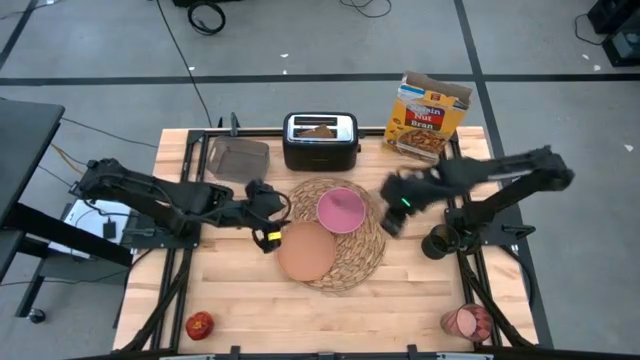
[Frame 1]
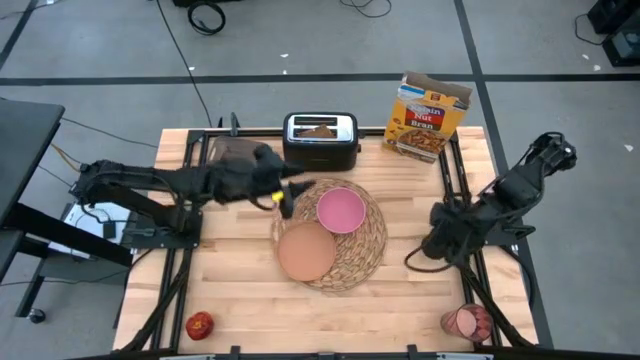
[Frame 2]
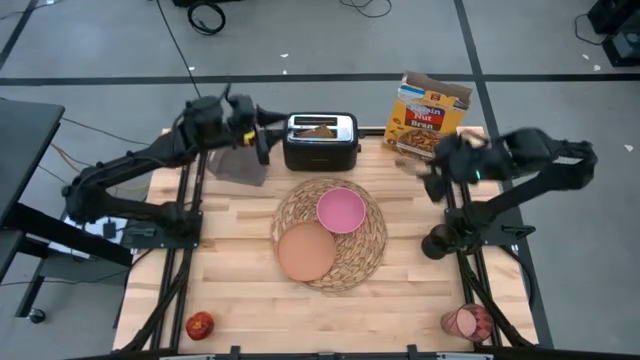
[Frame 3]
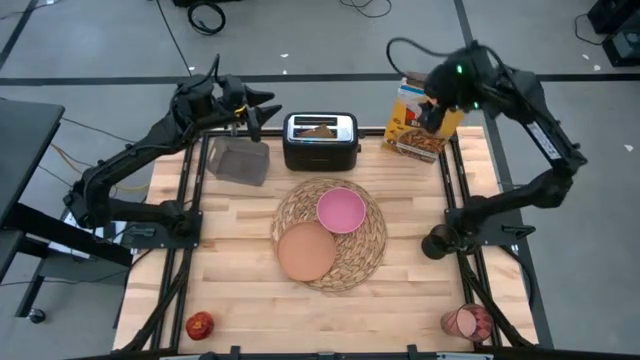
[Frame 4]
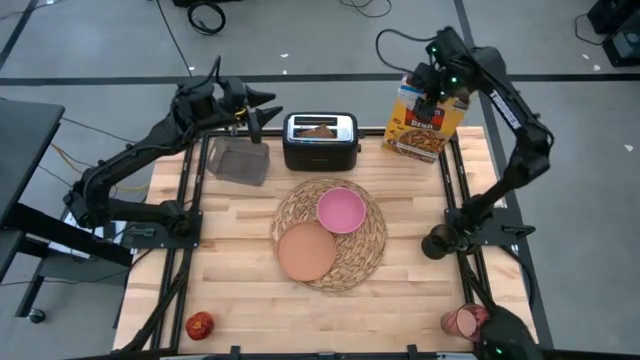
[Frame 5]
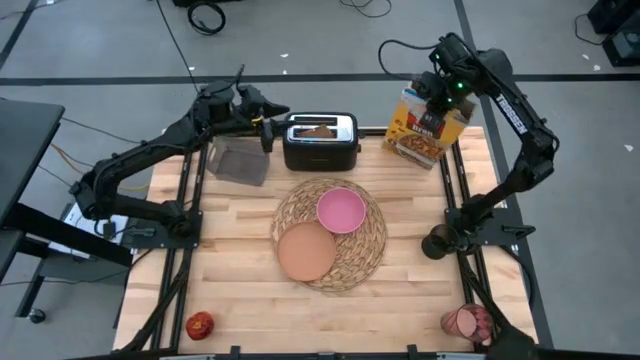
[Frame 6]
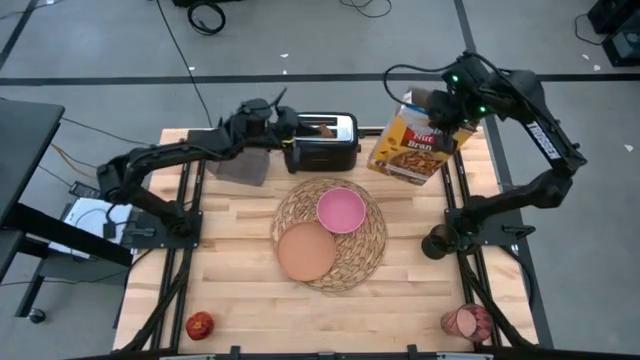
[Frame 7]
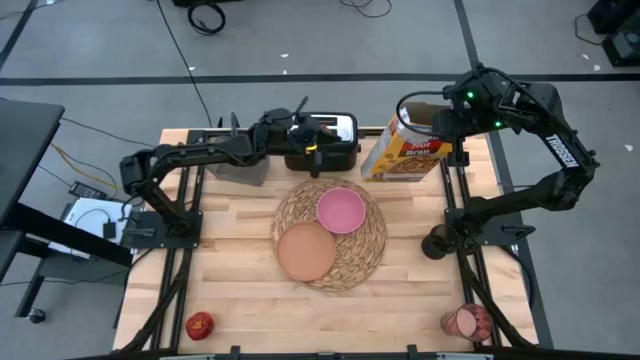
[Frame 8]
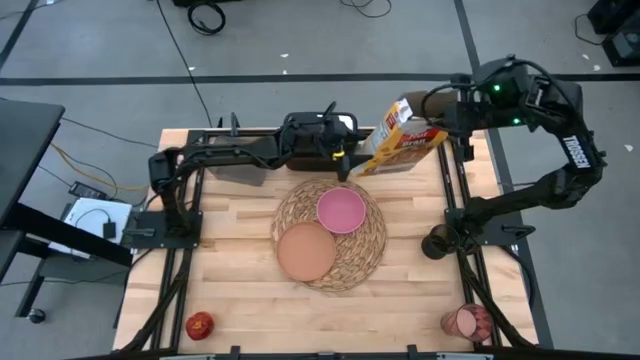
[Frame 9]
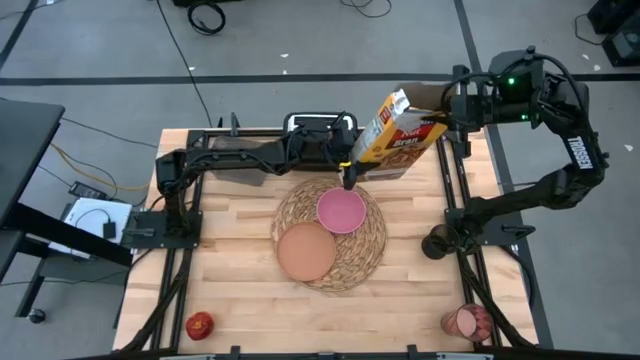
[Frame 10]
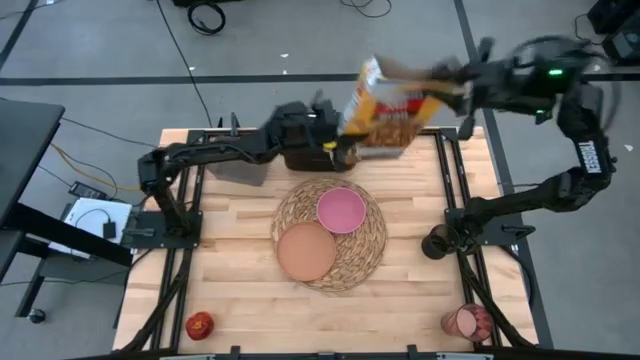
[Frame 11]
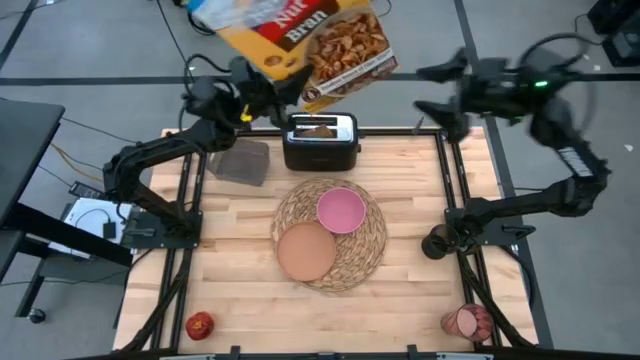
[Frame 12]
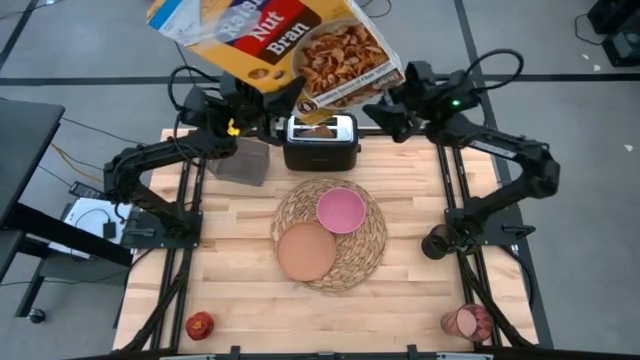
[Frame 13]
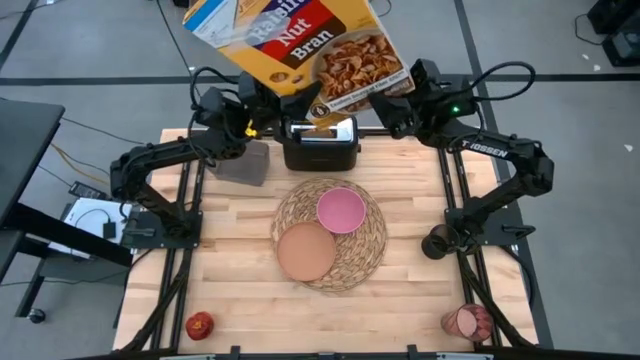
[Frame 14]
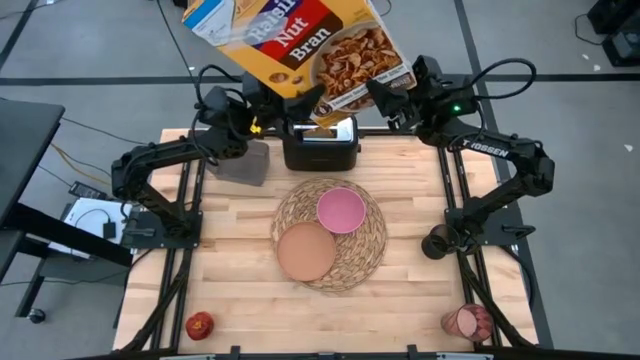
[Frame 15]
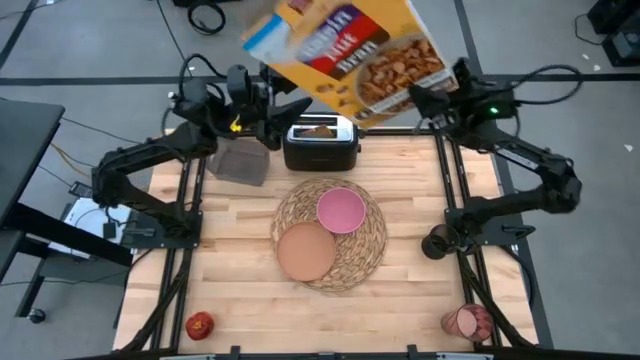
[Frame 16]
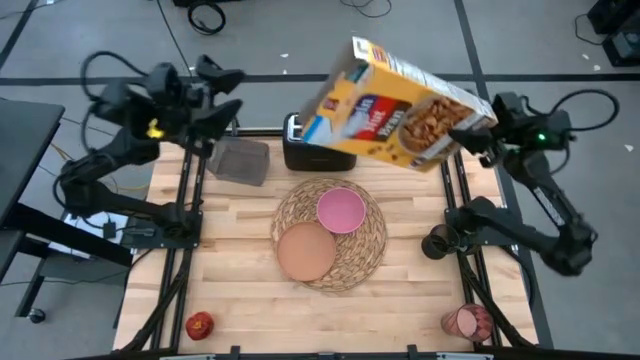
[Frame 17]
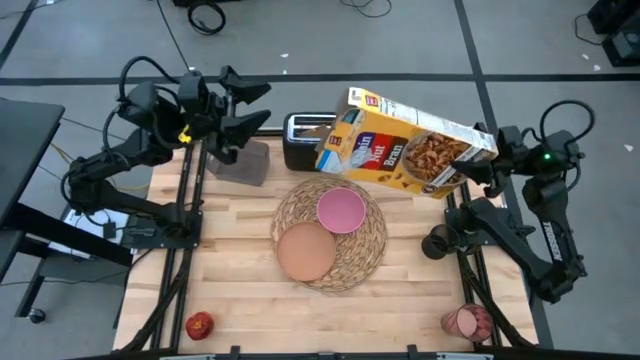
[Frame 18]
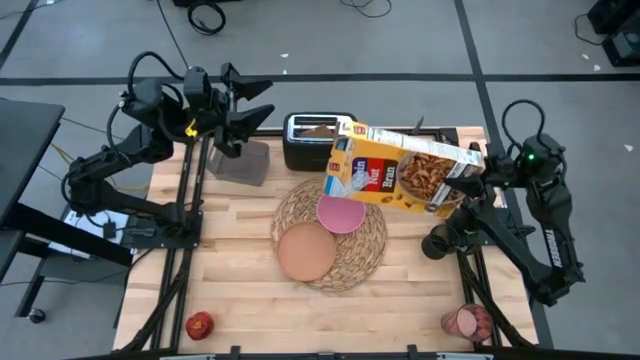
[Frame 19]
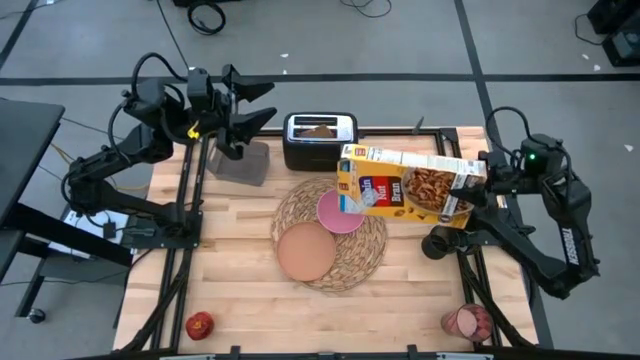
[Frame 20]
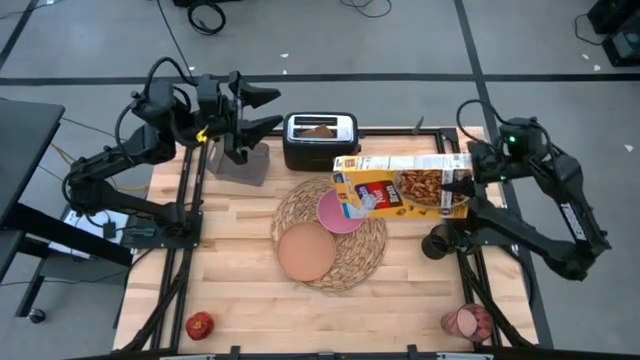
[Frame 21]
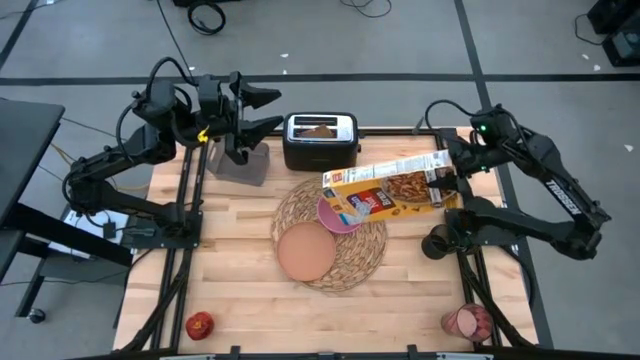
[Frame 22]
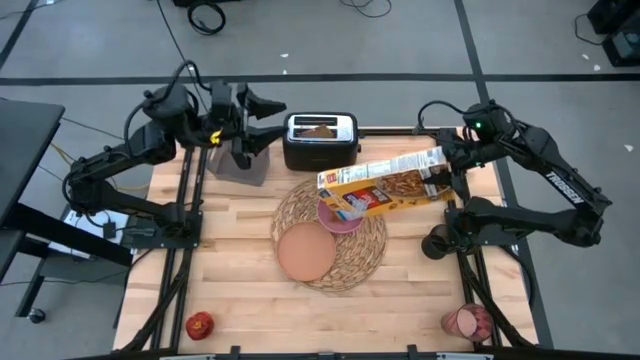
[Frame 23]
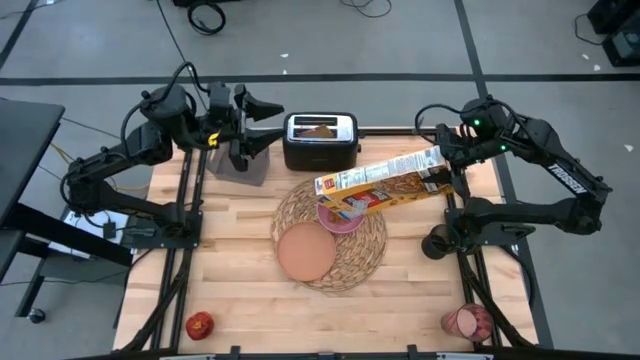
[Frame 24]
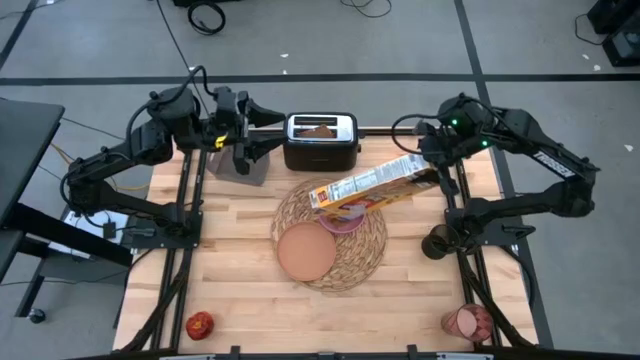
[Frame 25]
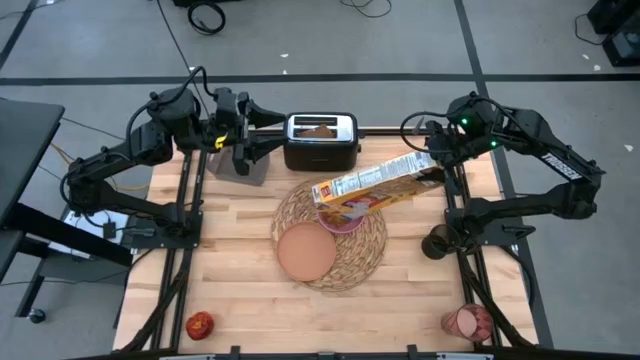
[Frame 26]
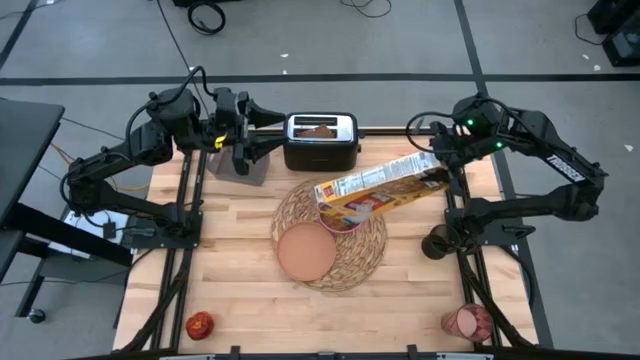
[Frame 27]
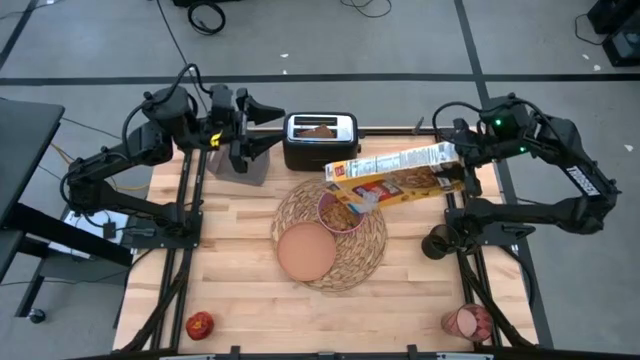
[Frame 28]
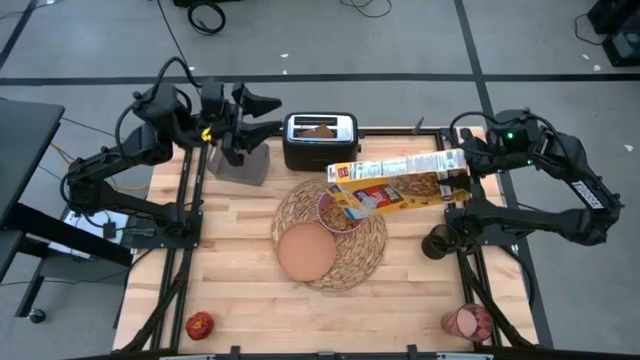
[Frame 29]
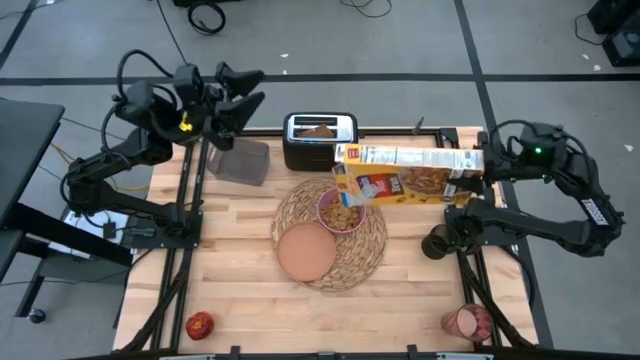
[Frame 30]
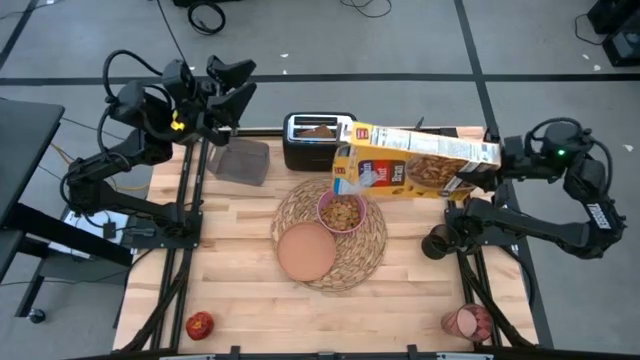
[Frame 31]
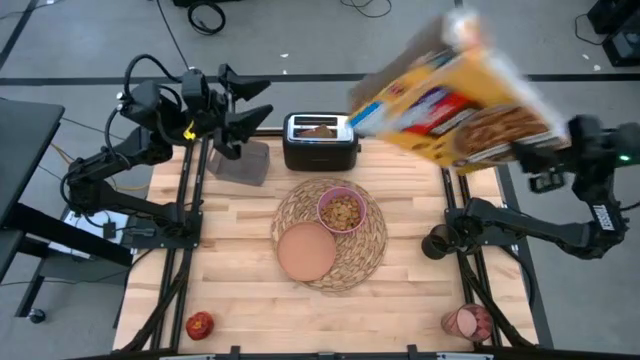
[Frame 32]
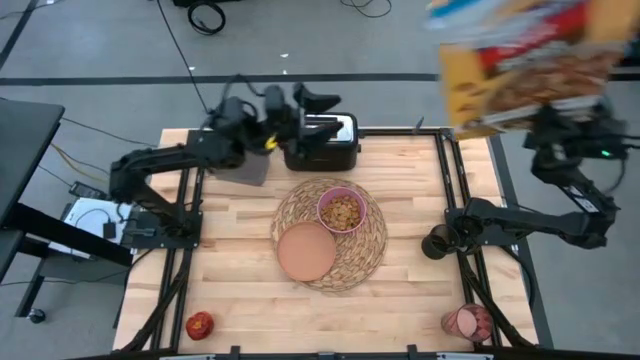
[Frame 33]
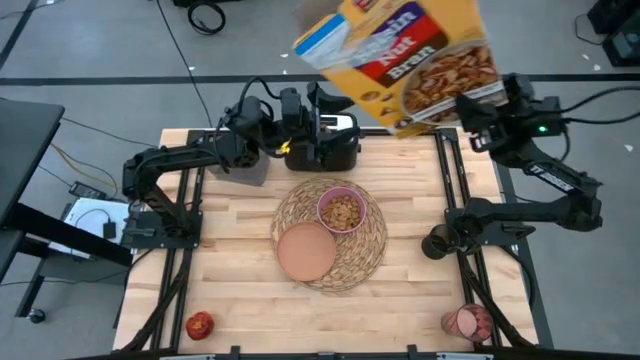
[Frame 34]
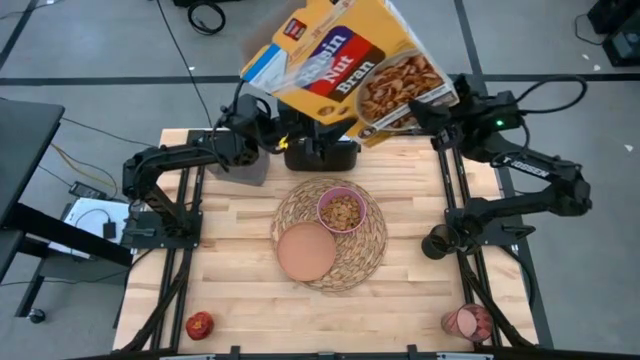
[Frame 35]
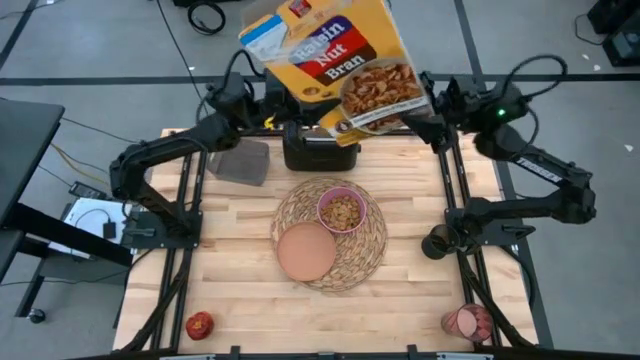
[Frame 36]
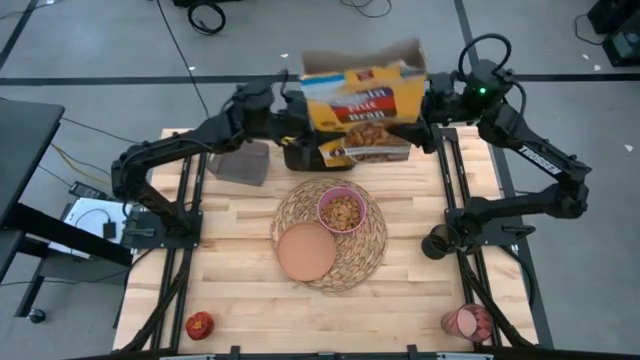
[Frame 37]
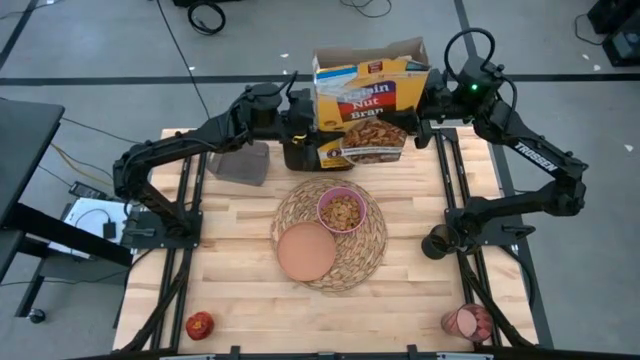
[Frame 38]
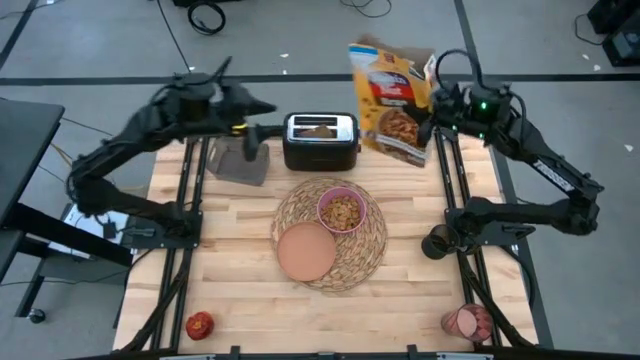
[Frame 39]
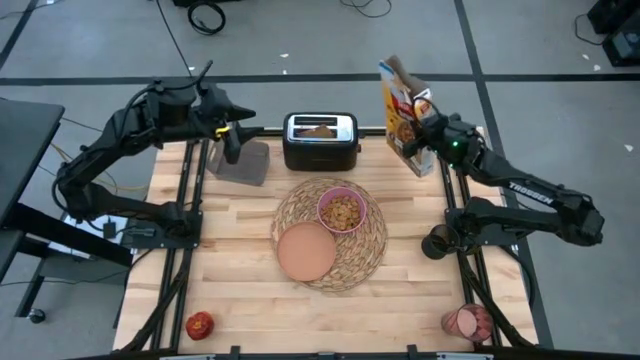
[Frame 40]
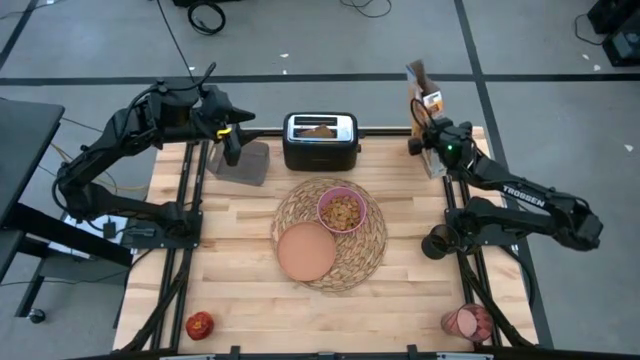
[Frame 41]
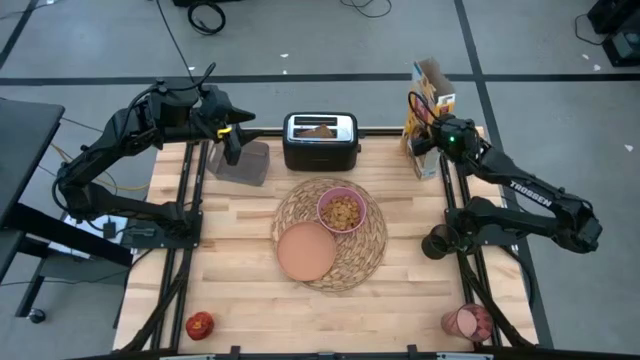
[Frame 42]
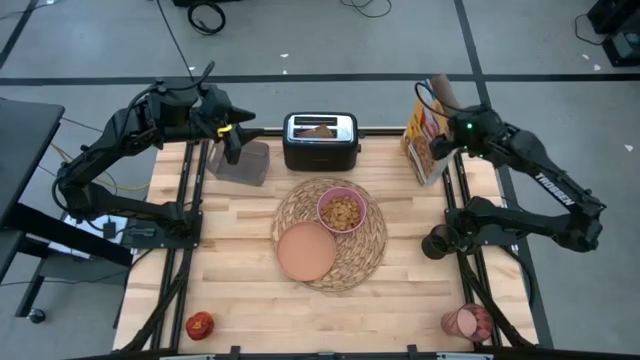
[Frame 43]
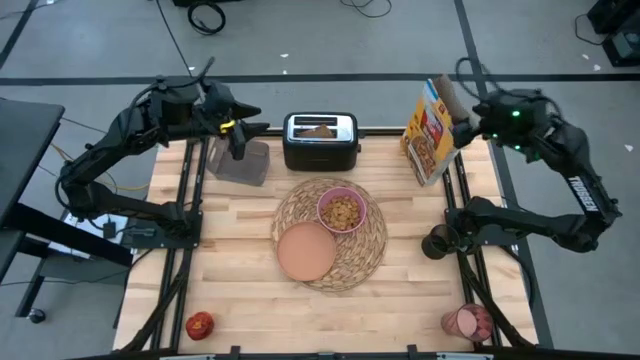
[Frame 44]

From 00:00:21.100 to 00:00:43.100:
Task: Arrange a breakfast setting
Pour the cereal from the cereal box into the pink bowl on the brown placemat
